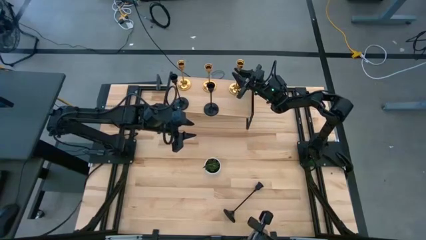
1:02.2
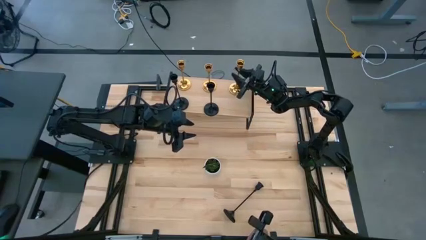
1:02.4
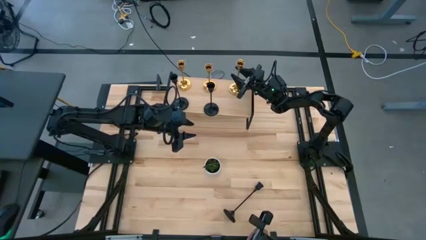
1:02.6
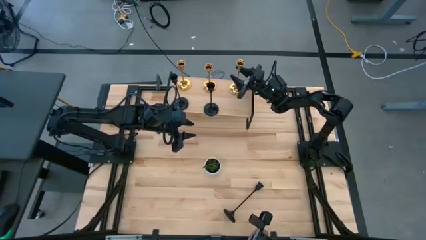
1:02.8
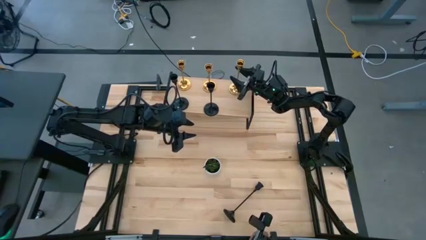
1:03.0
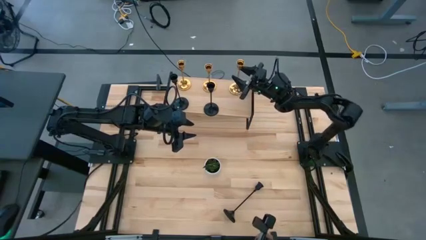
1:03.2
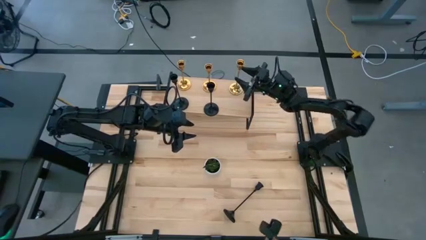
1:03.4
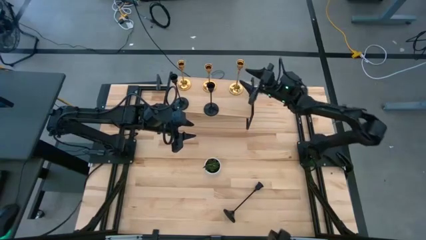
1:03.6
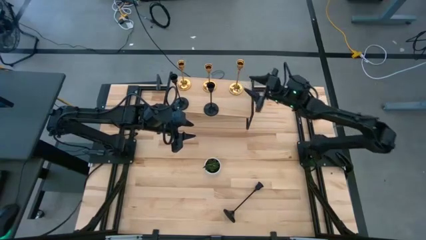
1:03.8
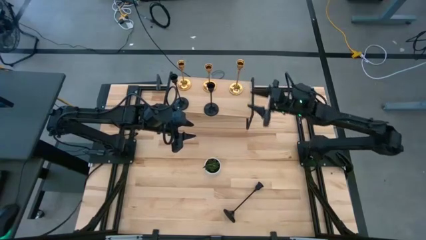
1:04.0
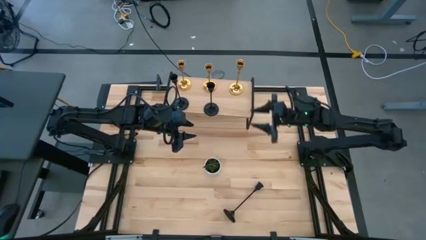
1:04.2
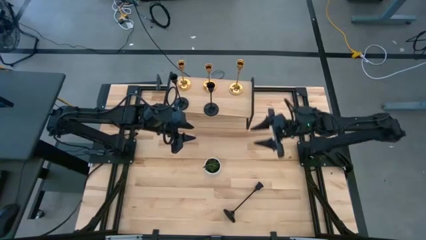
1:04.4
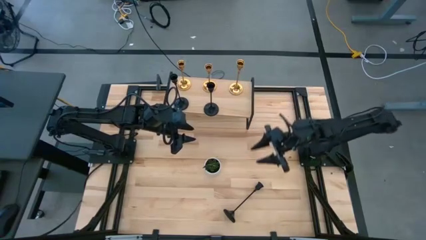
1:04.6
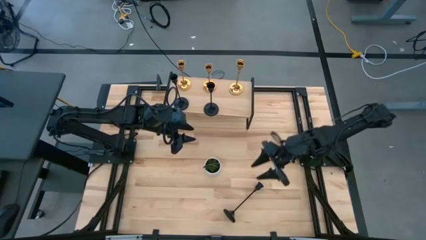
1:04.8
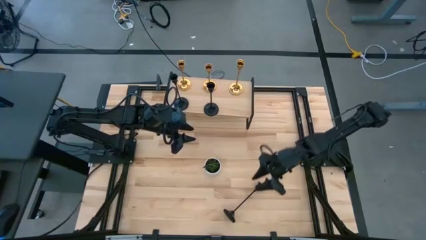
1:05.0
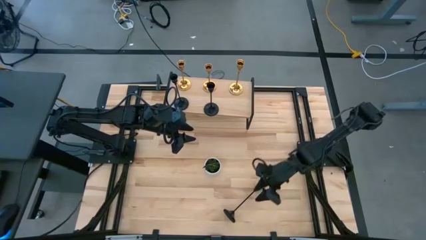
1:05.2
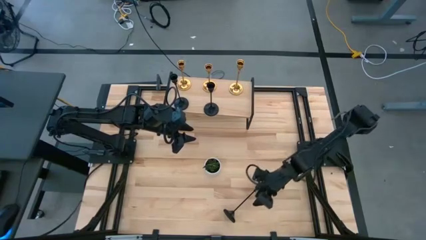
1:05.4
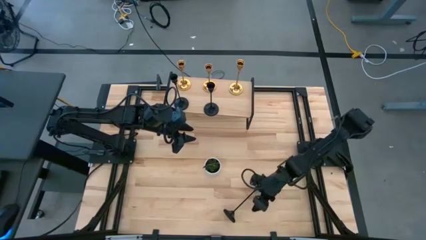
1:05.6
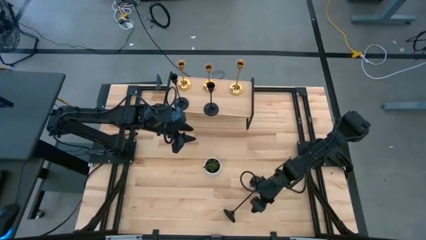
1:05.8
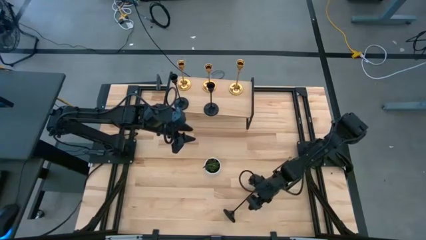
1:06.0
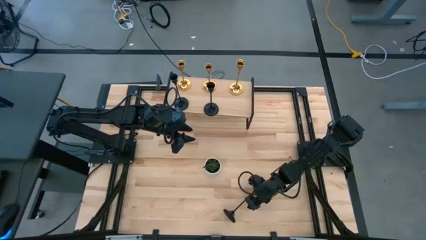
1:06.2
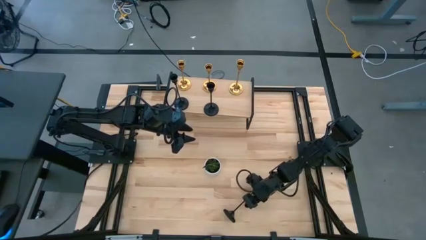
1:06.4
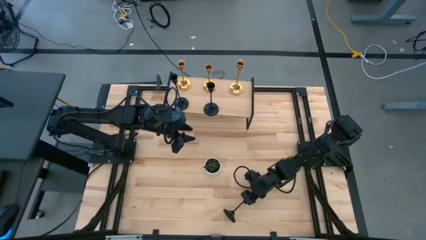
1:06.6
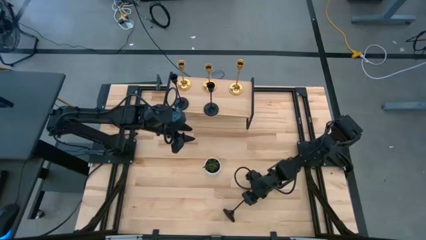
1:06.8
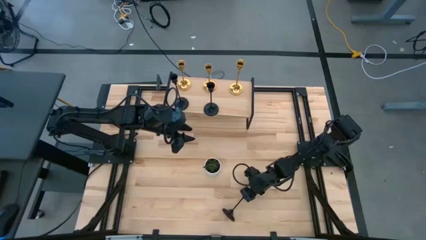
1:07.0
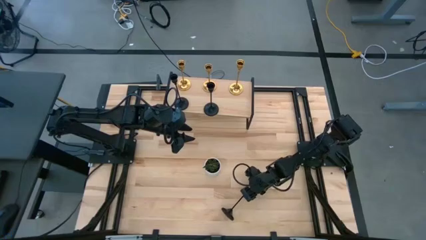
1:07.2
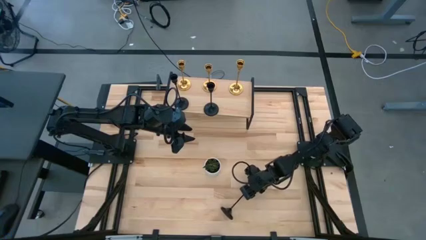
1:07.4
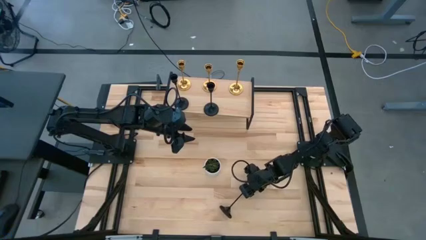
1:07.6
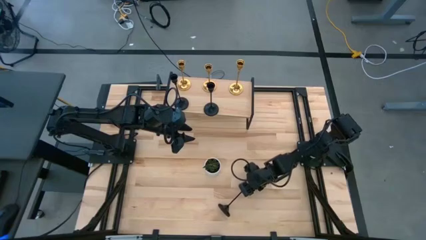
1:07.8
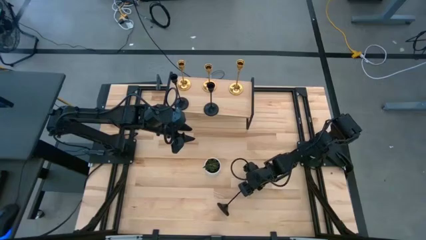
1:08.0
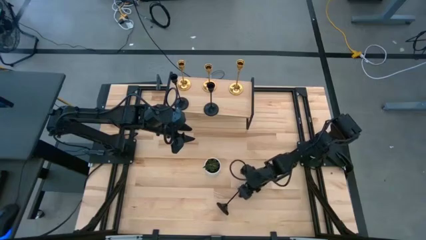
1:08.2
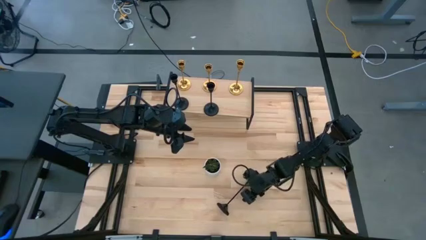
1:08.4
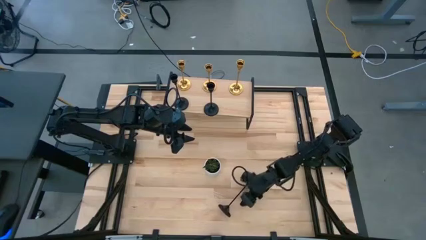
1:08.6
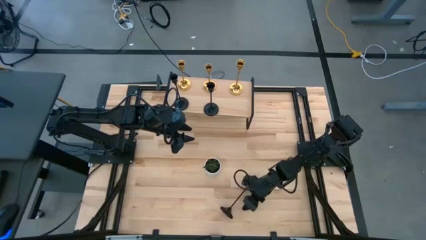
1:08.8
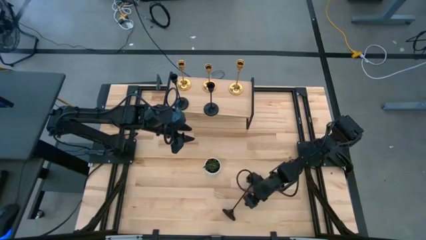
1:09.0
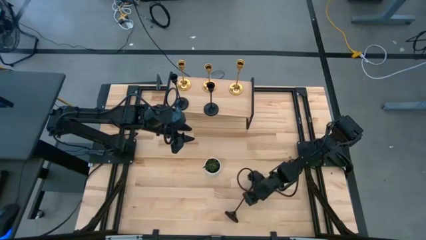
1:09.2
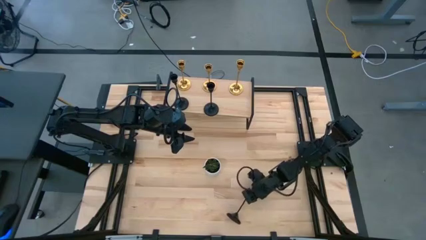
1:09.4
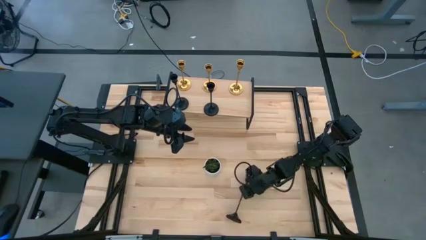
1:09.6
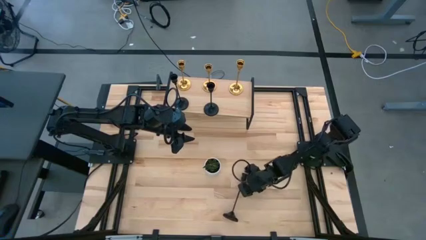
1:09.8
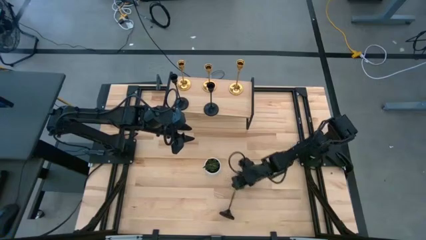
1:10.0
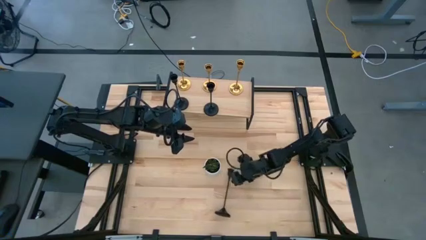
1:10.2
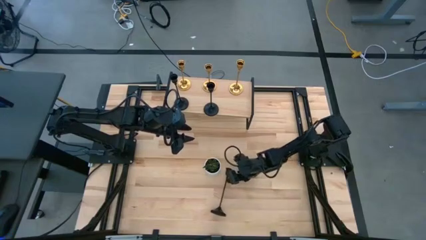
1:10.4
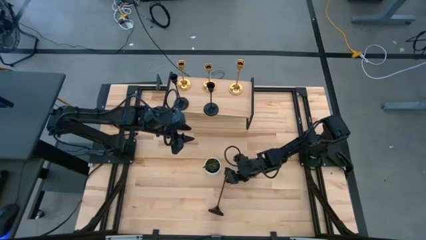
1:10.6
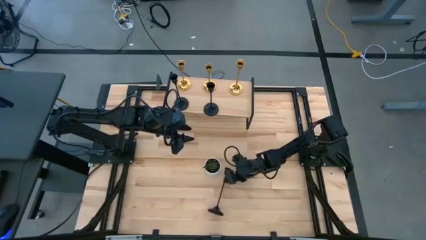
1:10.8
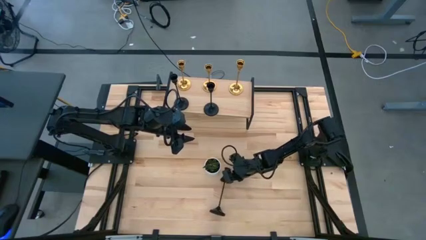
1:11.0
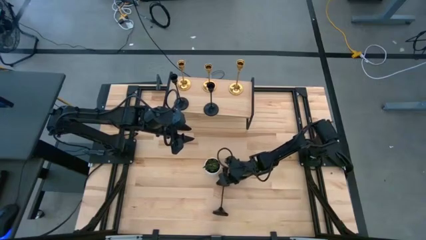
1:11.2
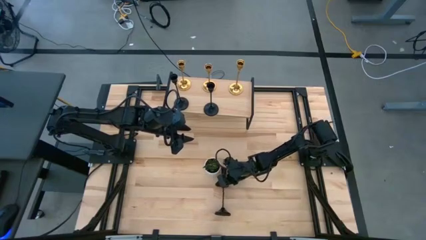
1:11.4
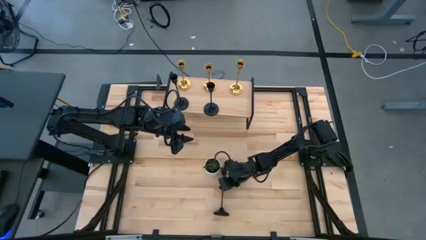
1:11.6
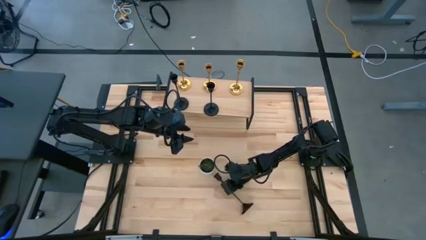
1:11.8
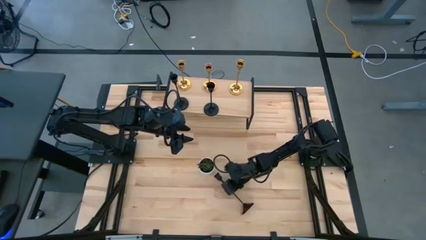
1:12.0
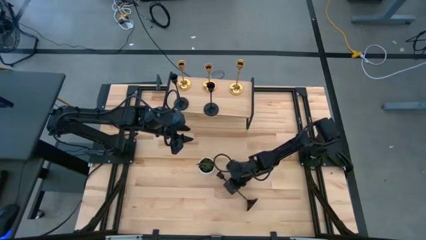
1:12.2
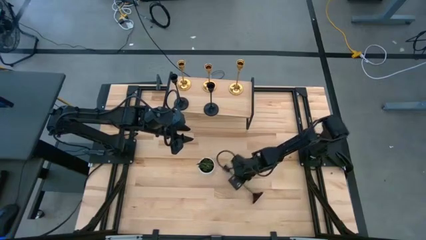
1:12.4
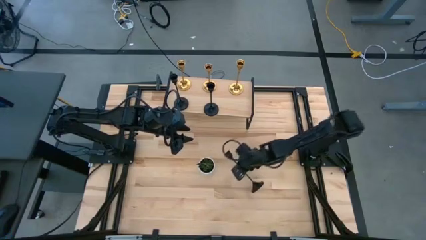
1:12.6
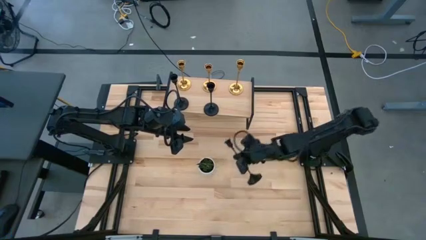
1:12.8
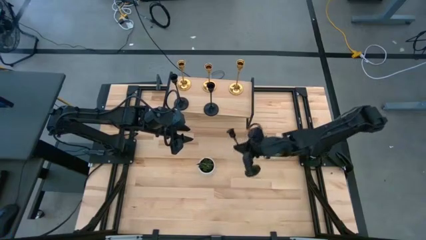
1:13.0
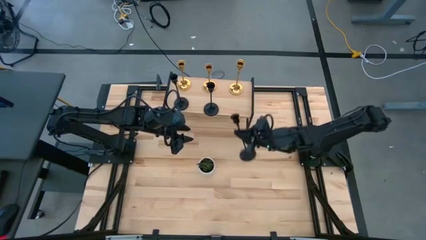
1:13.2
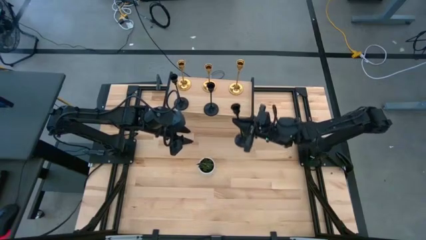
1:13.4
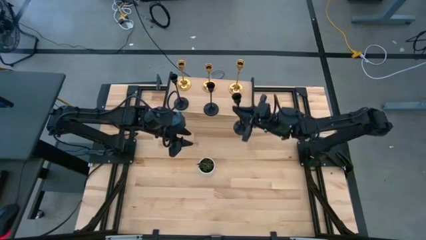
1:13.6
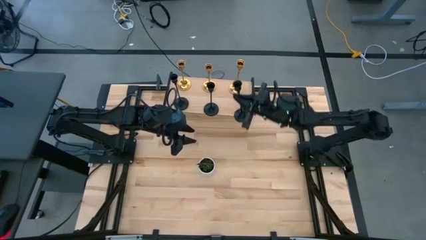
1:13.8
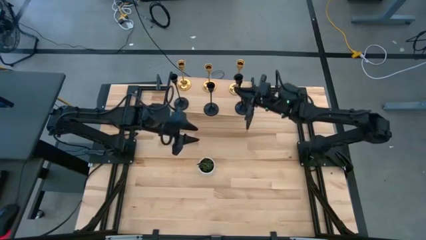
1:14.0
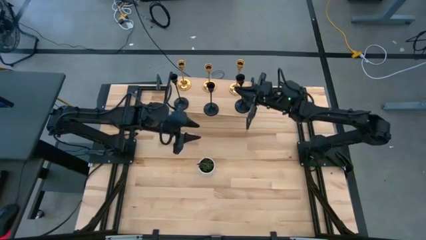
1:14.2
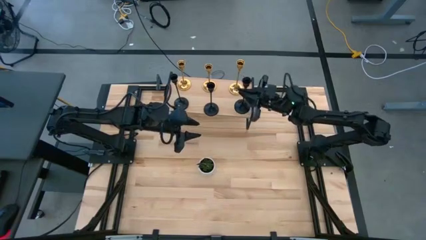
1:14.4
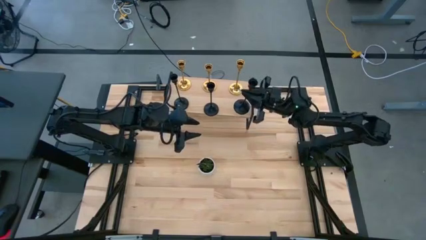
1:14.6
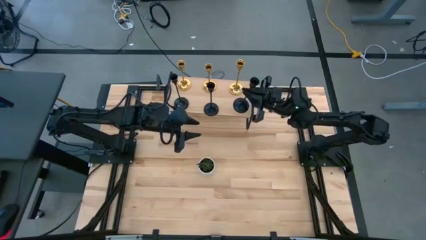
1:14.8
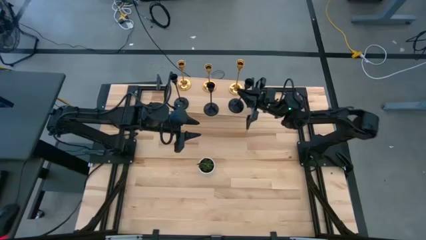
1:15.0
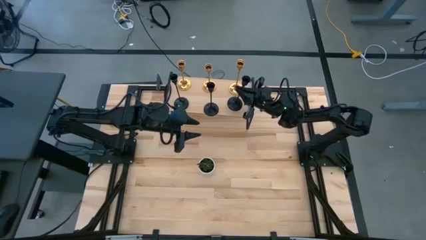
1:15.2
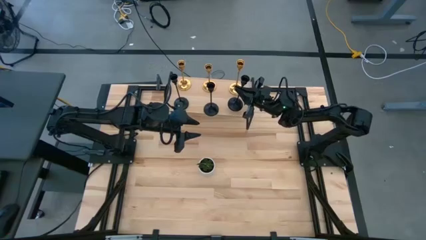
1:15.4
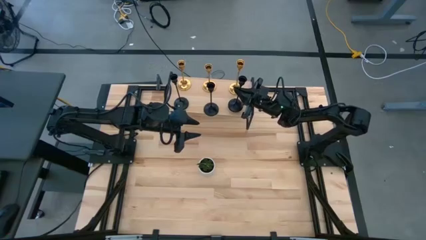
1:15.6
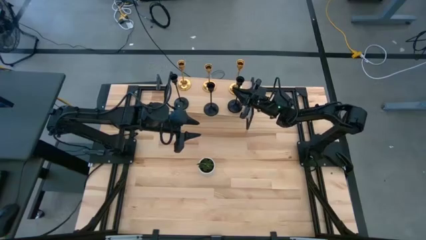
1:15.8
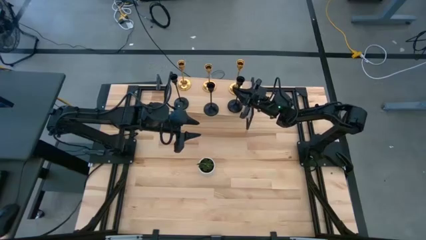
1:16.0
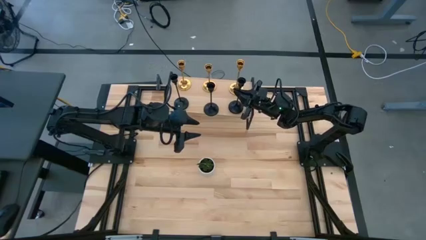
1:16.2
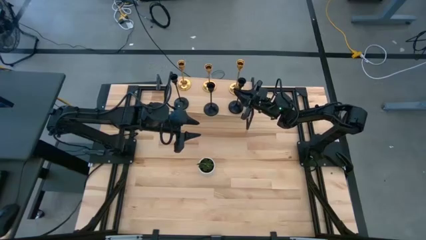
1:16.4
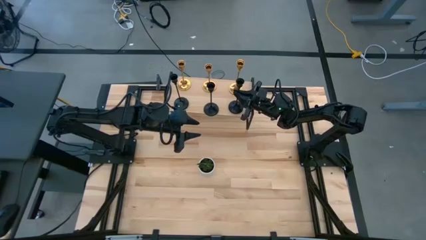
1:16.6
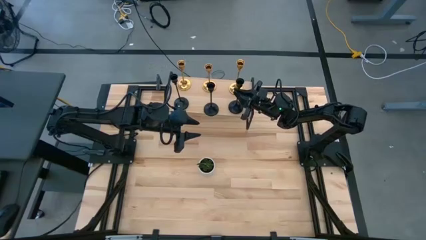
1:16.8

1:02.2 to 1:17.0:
Task: Pick & Place candle stick holders
Put the black candle holder on the shelf aligned with the other black candle holder

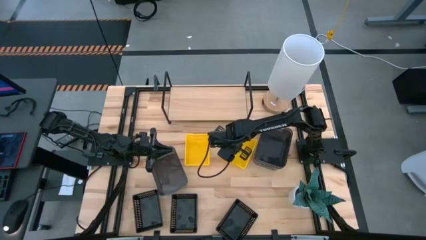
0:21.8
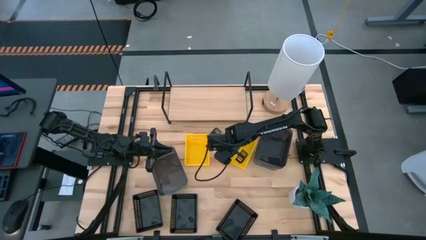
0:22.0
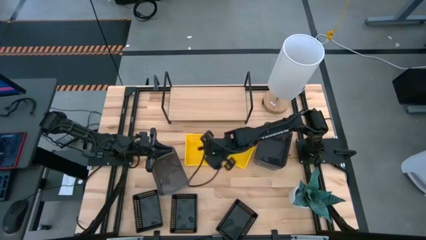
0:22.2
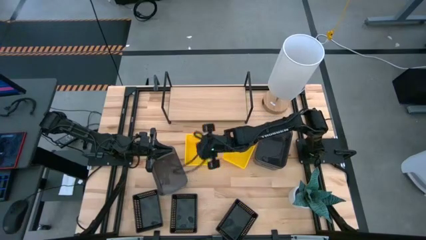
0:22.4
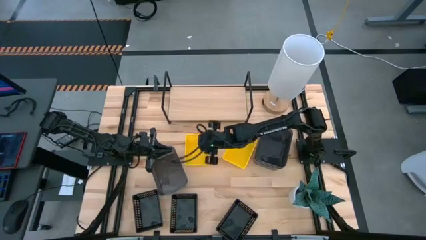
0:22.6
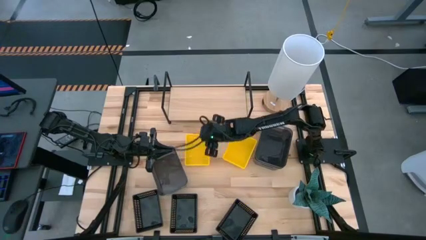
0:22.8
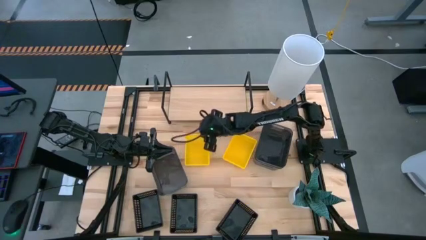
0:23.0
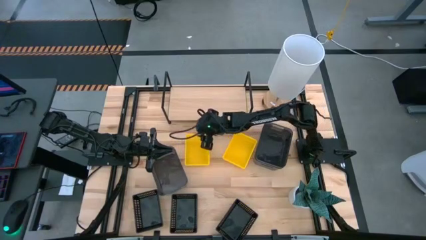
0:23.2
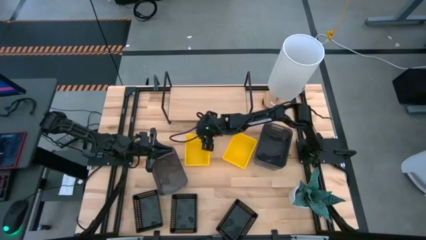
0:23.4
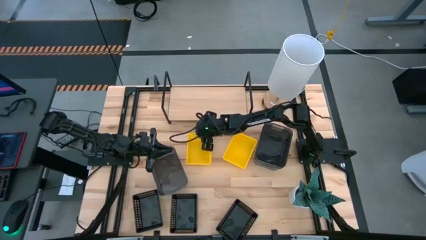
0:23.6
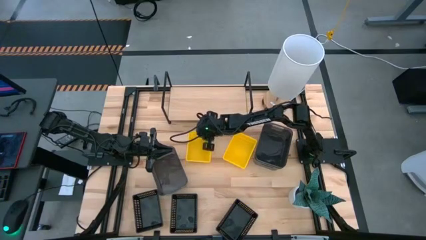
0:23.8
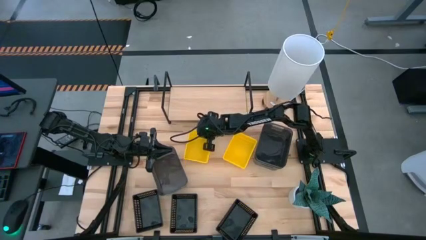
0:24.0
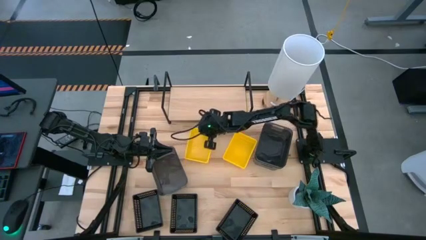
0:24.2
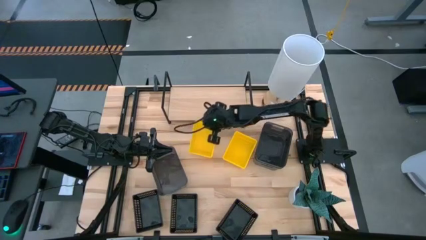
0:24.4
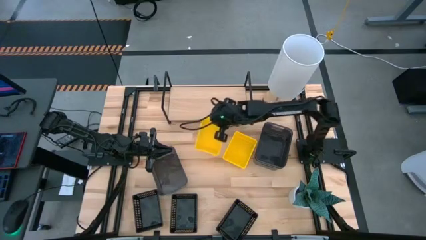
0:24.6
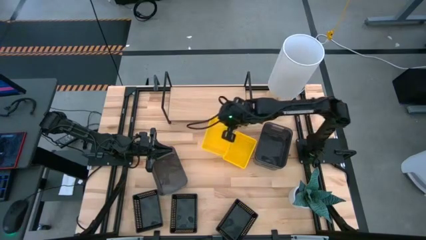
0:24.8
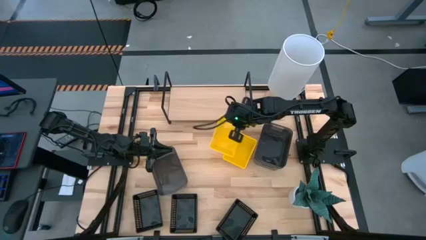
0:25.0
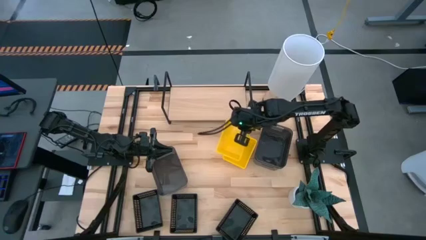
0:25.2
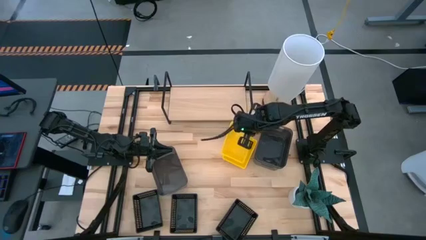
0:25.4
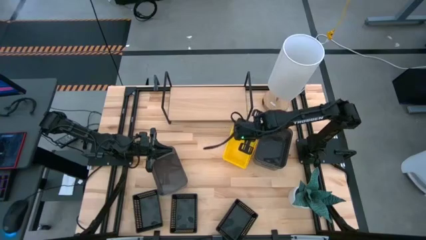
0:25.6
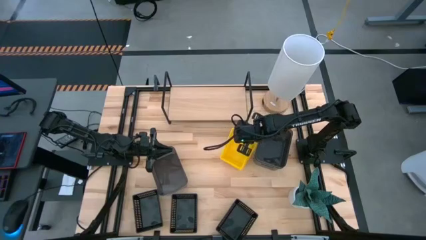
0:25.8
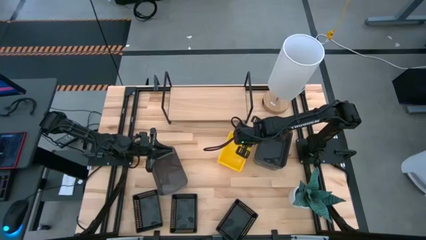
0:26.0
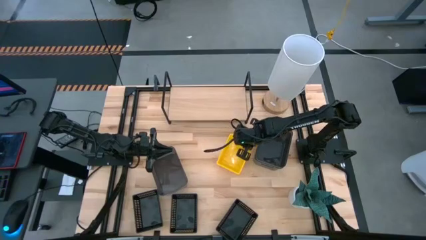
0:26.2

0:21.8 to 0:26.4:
Task: Stack baskets on shelf by color
Stack the left yellow bin on the yellow bins
